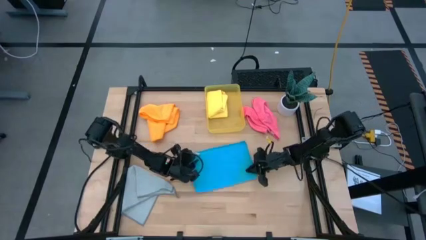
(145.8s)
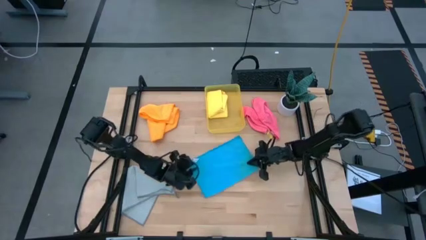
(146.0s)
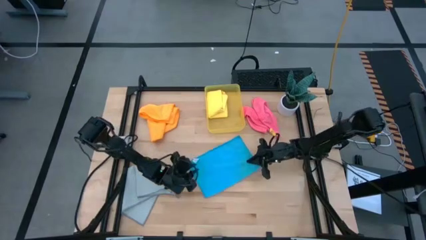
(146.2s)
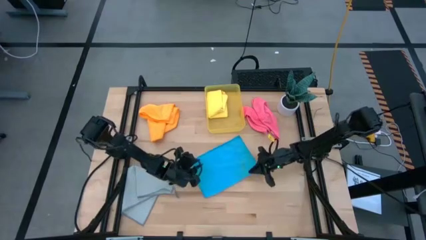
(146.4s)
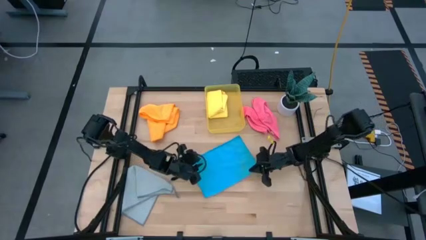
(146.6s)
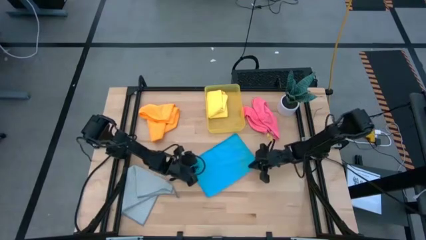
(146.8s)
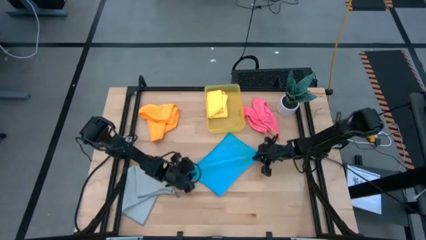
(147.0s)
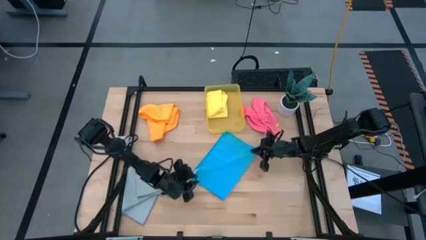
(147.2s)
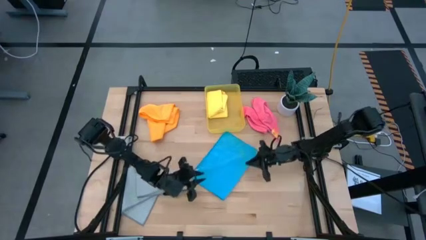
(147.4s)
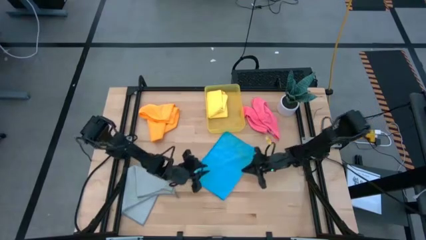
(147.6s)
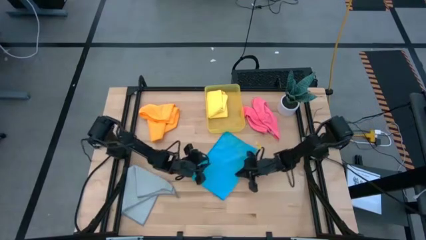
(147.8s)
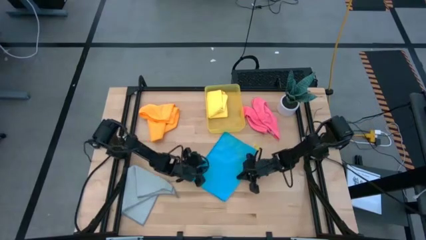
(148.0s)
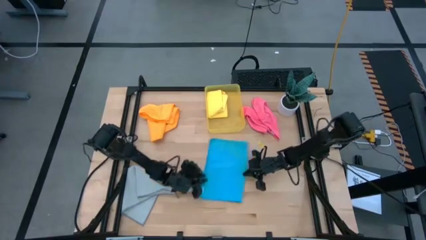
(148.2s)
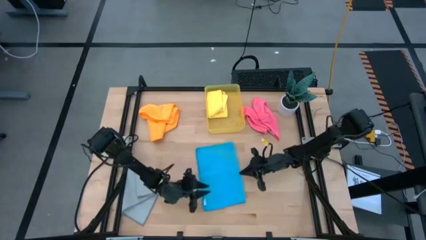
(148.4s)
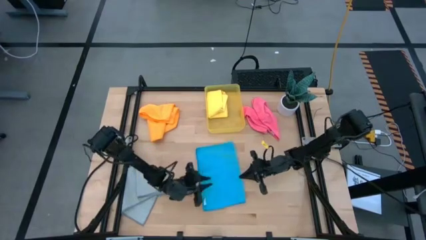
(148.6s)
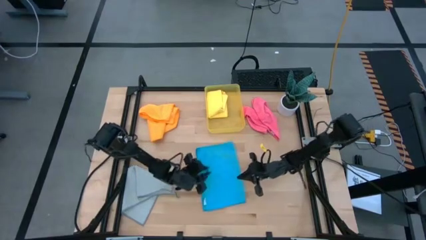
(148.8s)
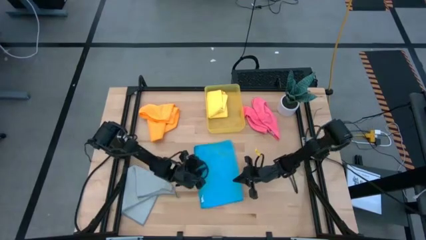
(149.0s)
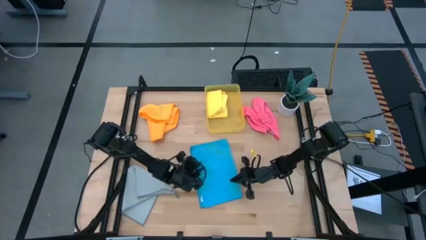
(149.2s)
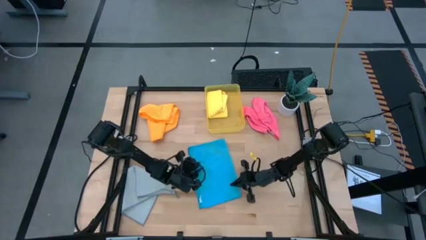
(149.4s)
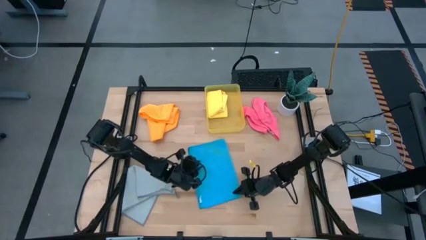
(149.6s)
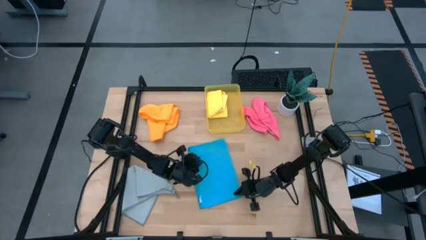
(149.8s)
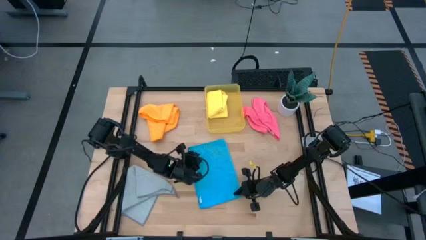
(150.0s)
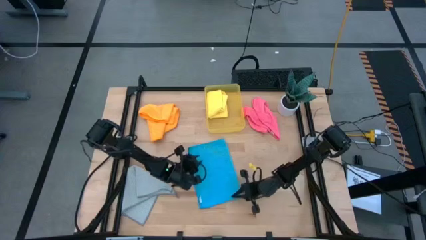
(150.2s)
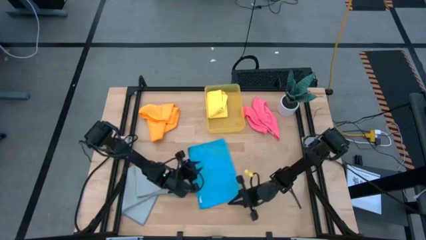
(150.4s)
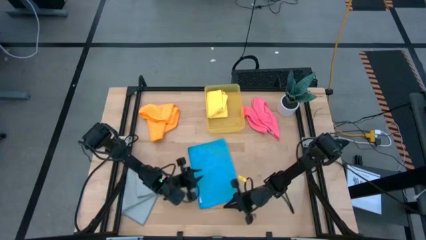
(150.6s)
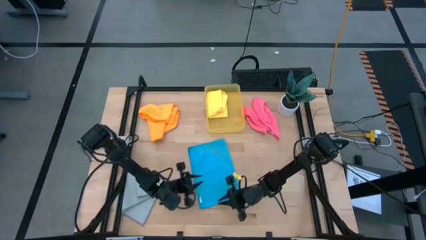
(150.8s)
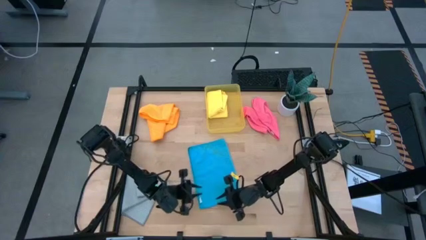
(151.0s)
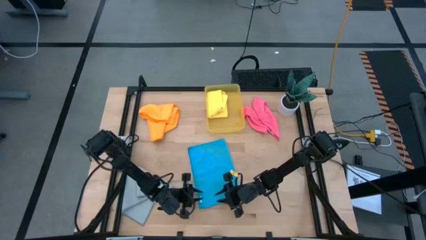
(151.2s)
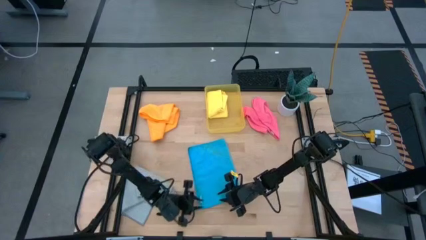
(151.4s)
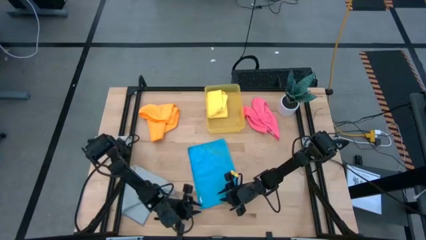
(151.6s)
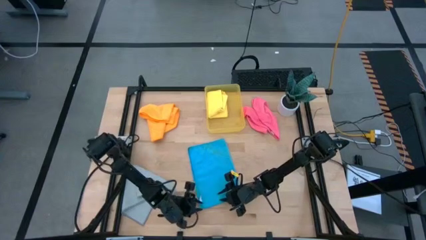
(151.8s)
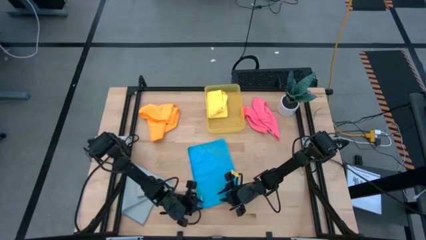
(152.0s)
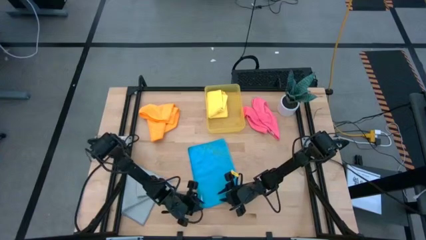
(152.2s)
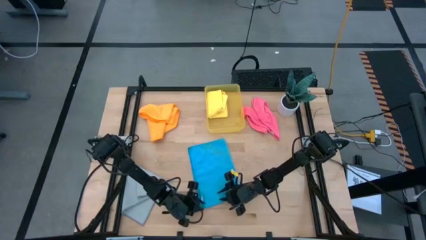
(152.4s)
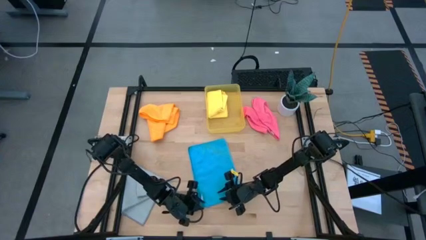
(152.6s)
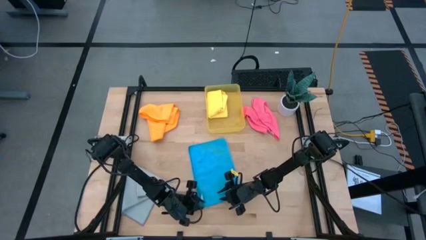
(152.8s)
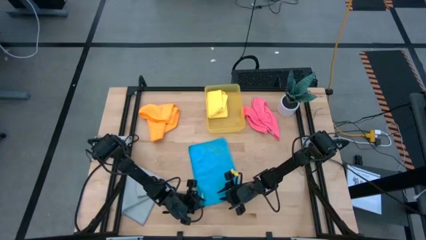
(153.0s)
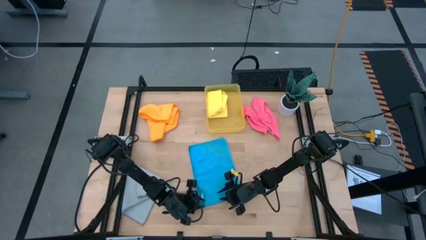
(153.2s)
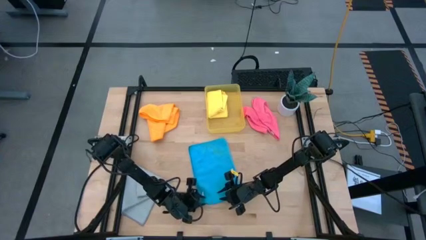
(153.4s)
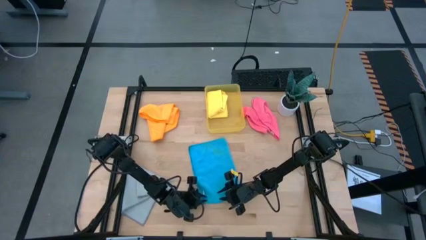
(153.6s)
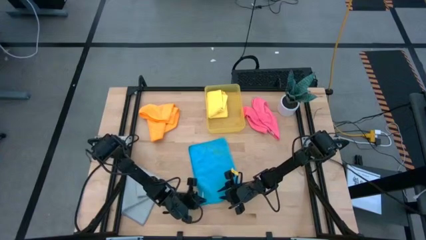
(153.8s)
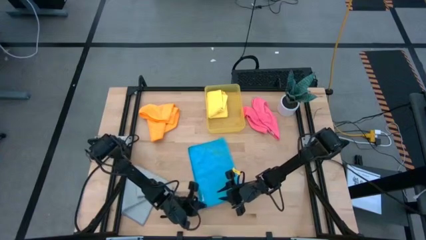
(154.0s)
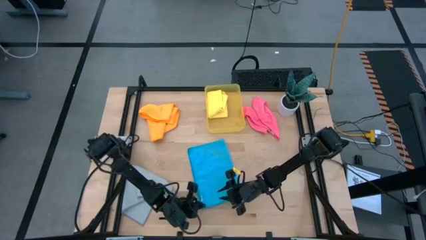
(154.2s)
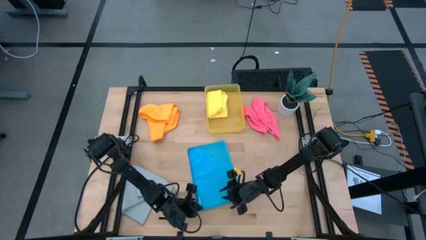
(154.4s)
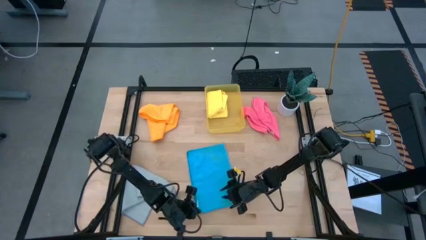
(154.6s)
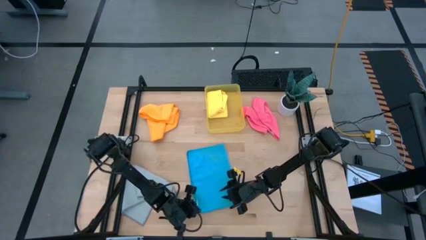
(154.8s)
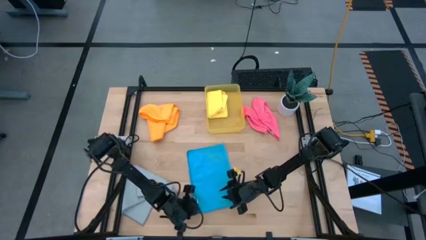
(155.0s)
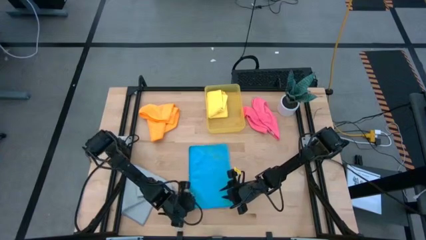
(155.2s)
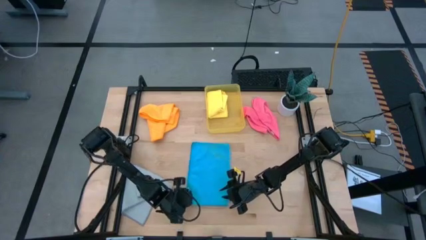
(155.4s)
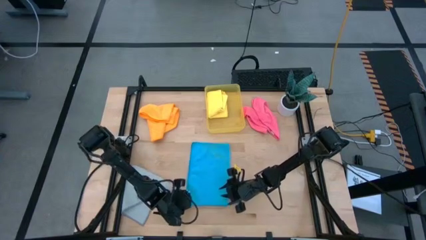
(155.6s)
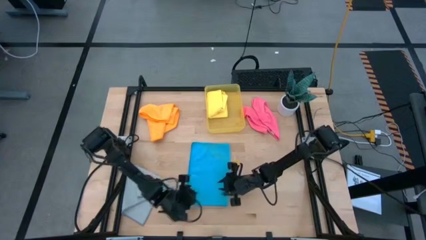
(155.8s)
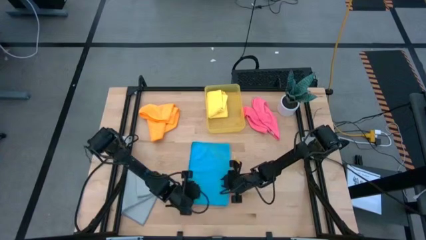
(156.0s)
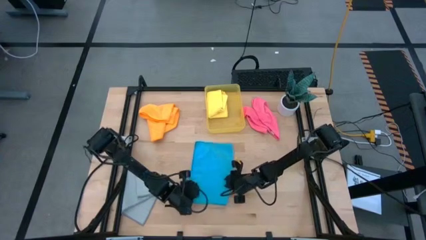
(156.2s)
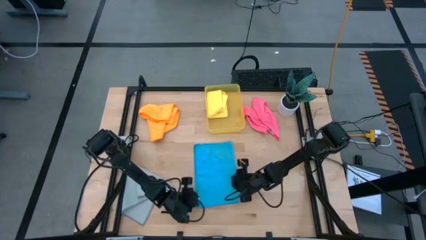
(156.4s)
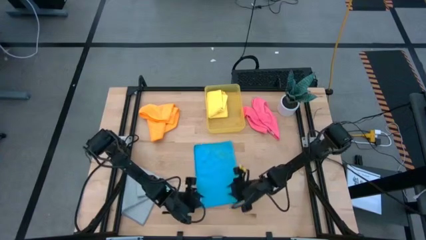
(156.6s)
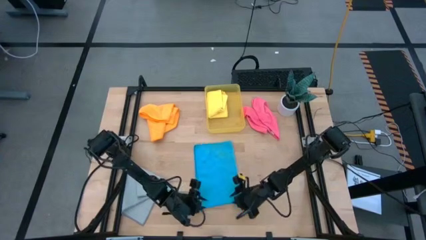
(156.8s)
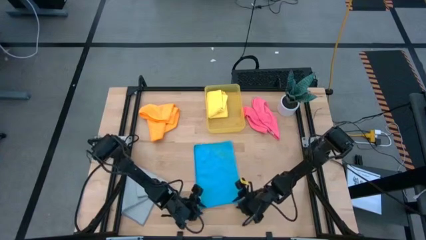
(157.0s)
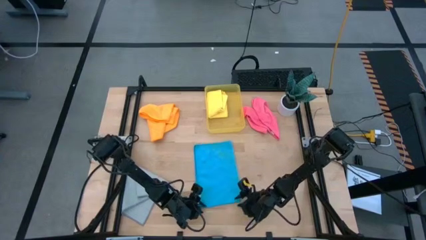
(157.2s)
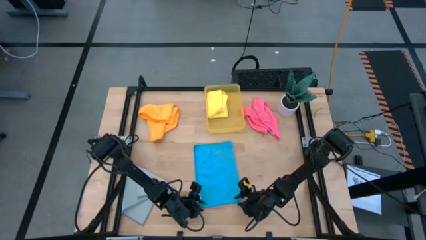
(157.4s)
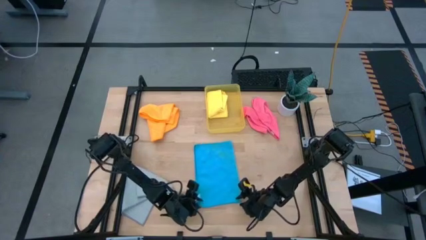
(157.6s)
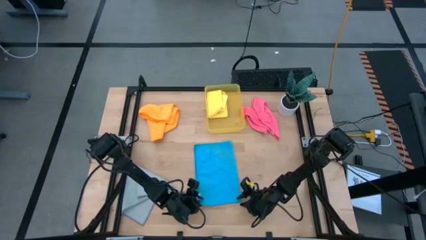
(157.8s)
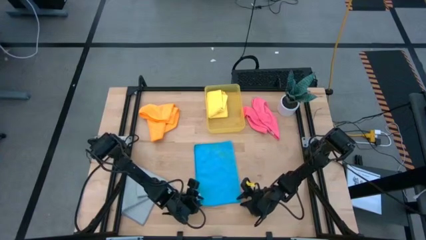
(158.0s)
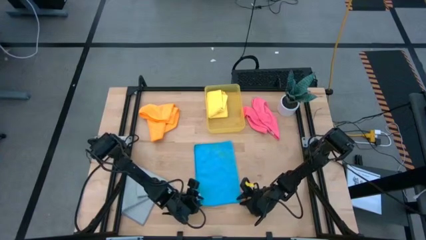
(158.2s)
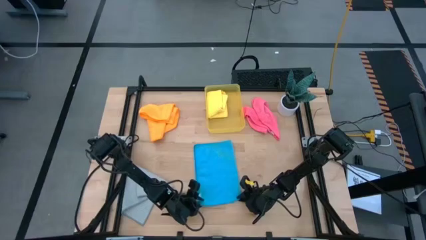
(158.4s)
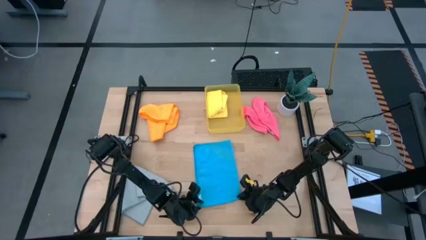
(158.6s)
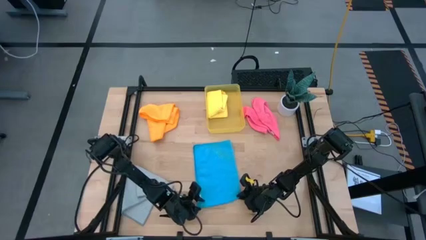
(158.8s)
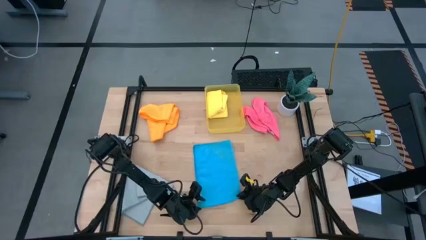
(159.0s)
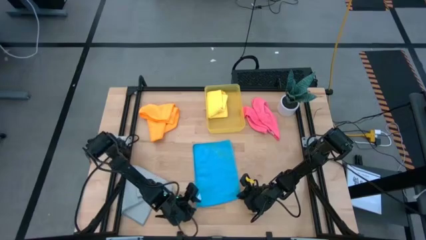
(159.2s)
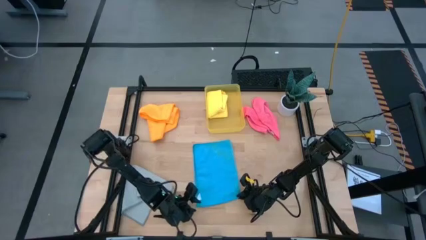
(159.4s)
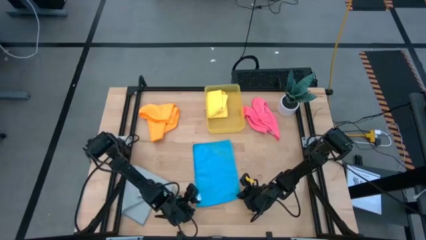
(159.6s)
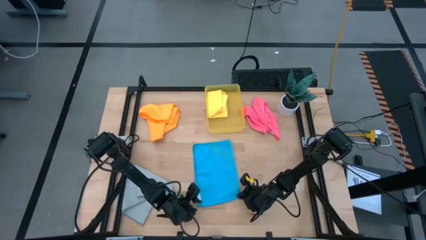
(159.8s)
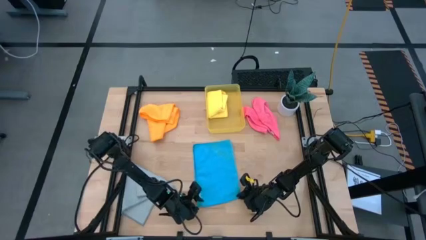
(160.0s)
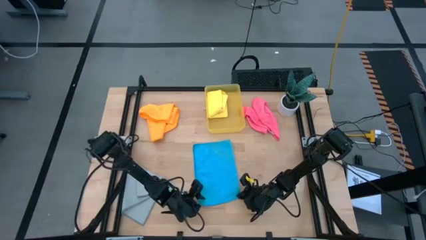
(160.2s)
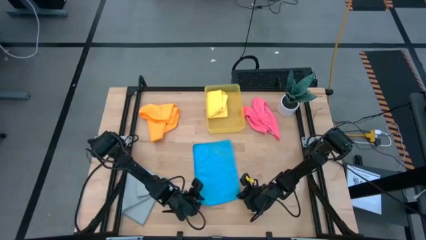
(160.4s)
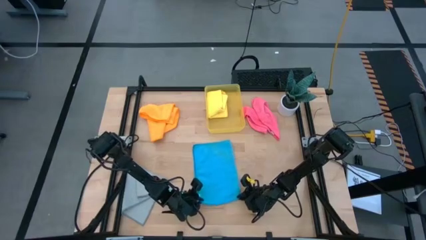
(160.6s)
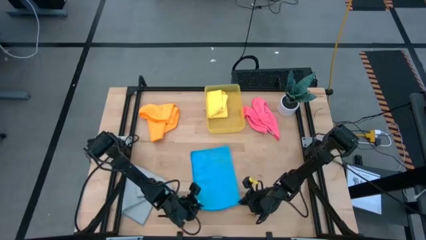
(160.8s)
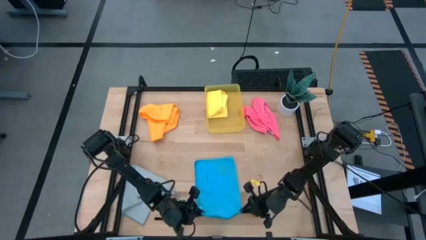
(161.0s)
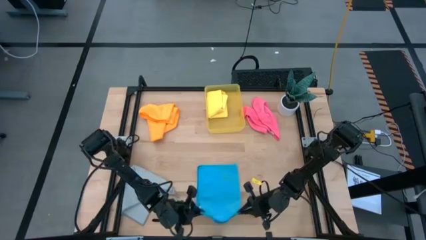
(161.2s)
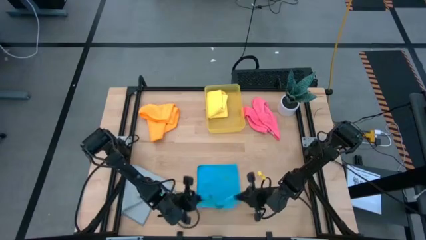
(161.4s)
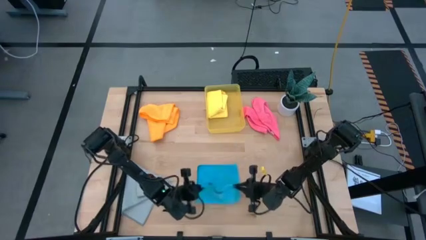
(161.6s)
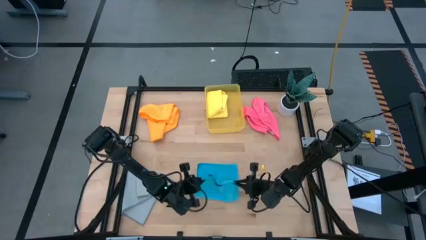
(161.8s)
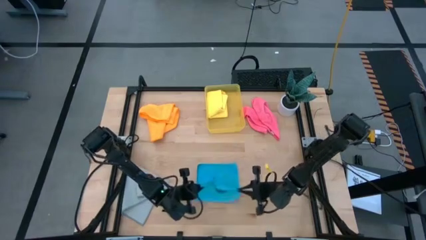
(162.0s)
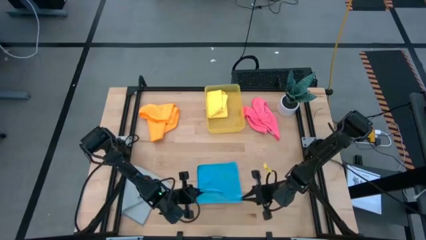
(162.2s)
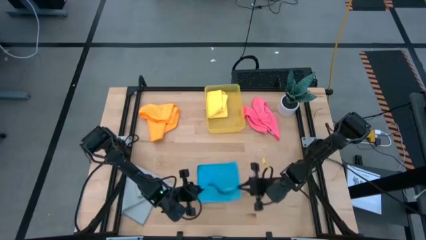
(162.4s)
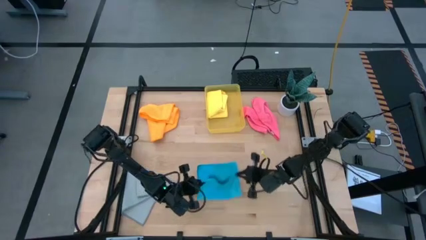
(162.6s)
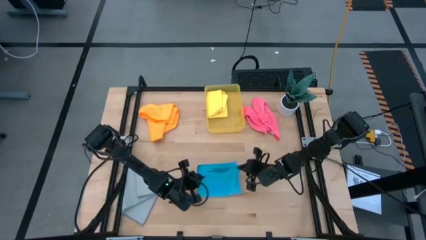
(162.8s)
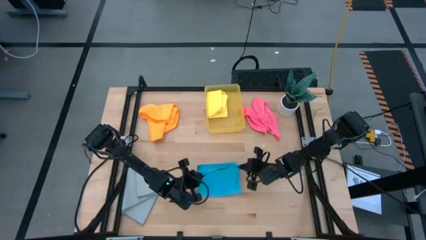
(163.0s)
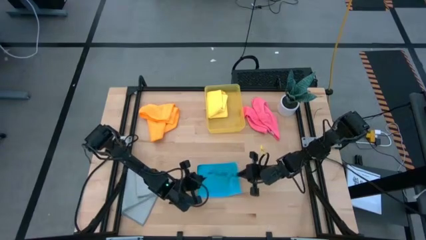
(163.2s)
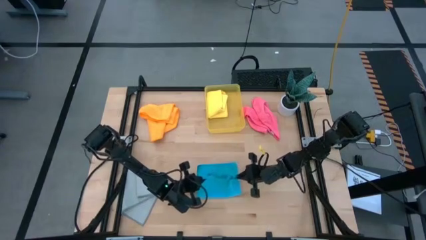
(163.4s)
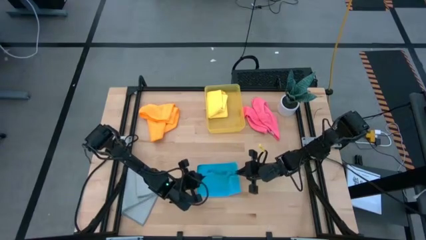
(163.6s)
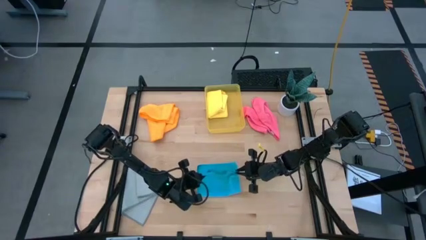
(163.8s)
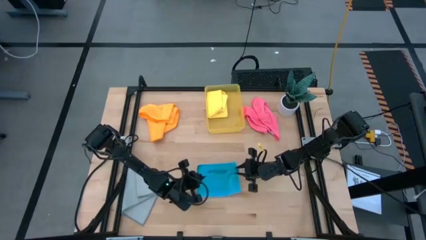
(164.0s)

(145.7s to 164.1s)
Task: Fold microfiber towels
Fold the blue microfiber towel

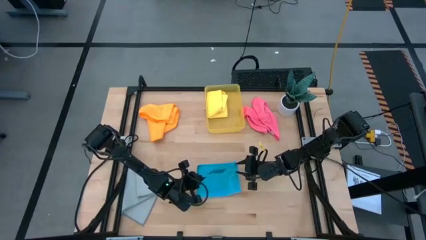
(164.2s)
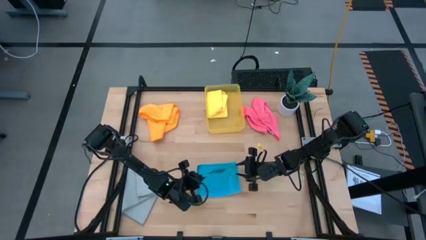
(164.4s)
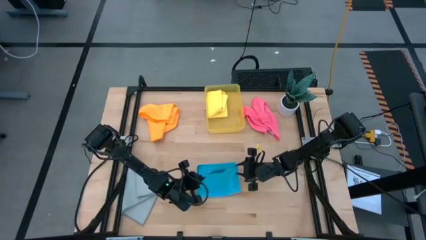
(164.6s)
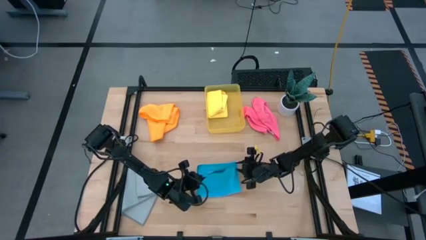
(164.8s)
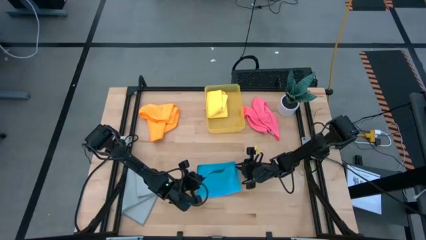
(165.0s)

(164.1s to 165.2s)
Fold the blue microfiber towel
